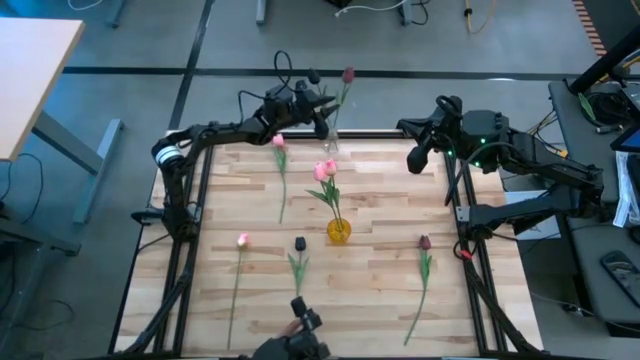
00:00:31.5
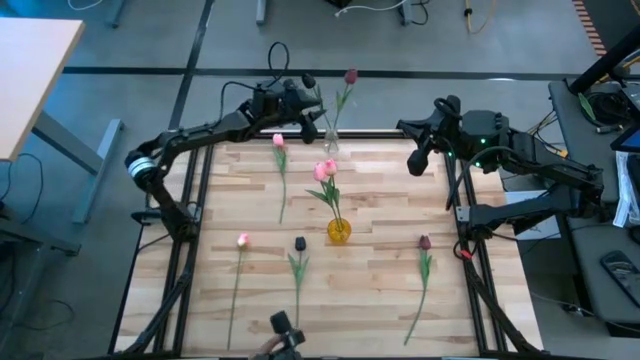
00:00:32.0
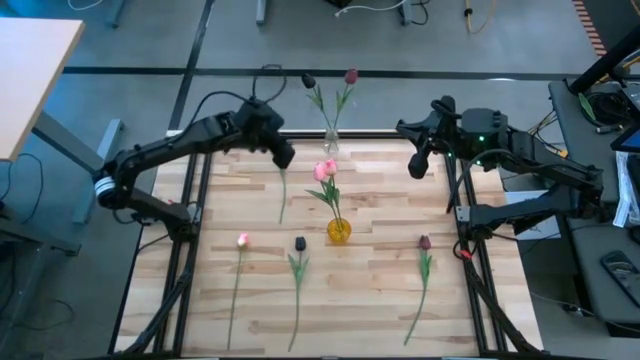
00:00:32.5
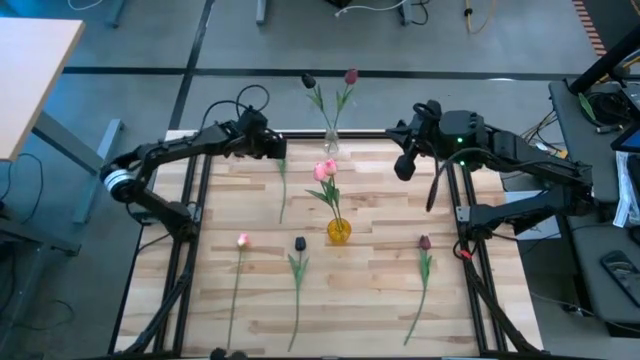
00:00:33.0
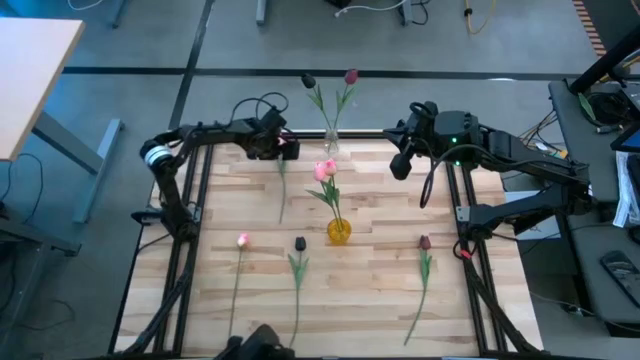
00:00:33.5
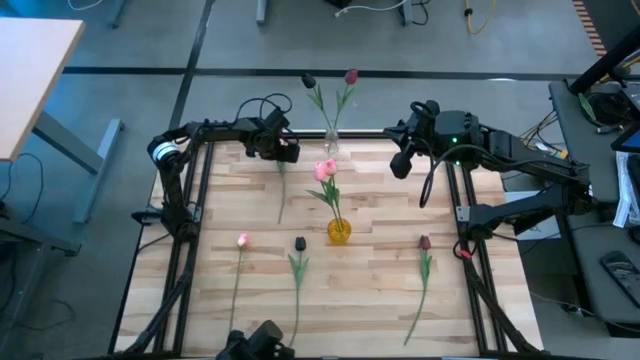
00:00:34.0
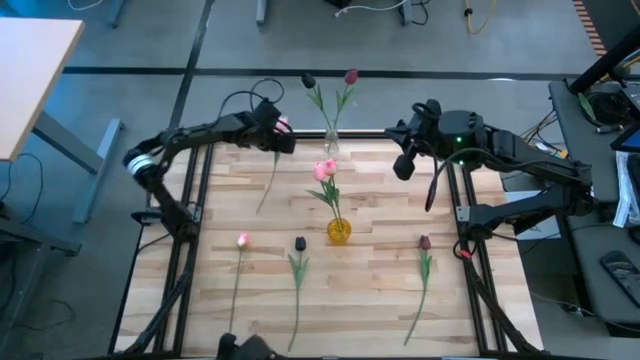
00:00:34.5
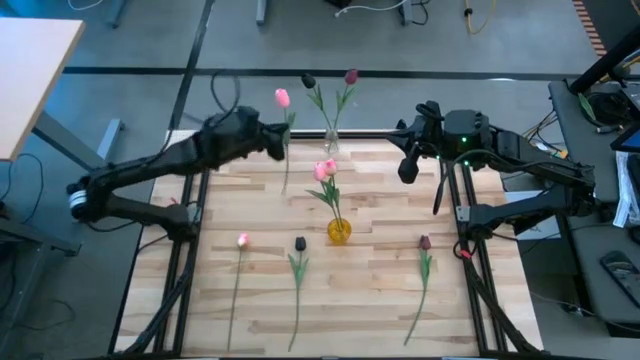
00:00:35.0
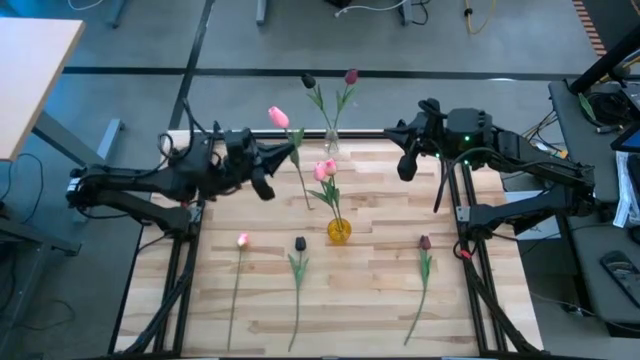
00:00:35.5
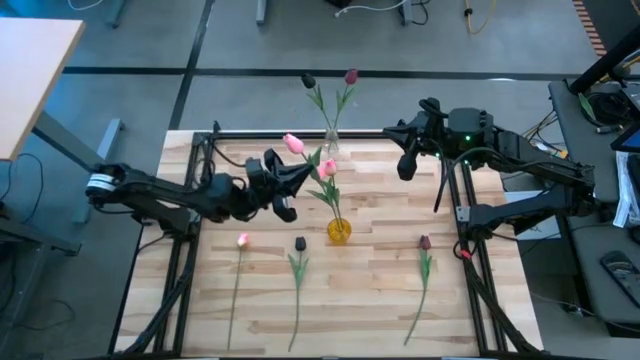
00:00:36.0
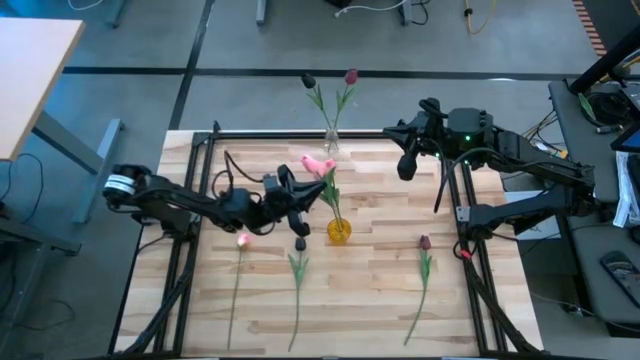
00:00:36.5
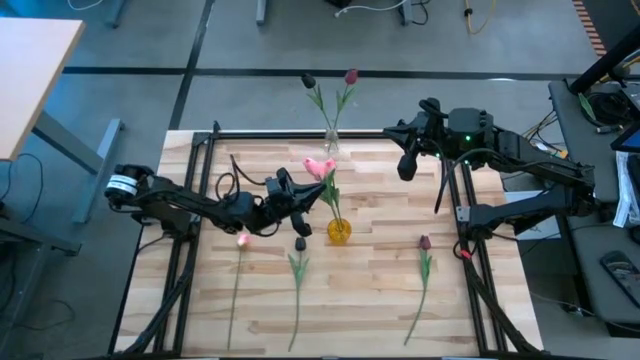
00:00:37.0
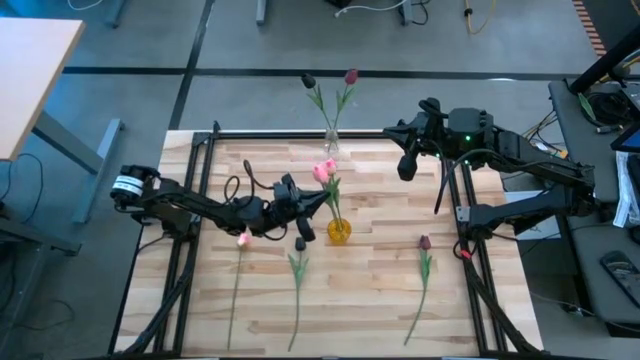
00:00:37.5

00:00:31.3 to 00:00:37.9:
Task: Sort flowers into vase by color
Put the pink tulip into the yellow vase

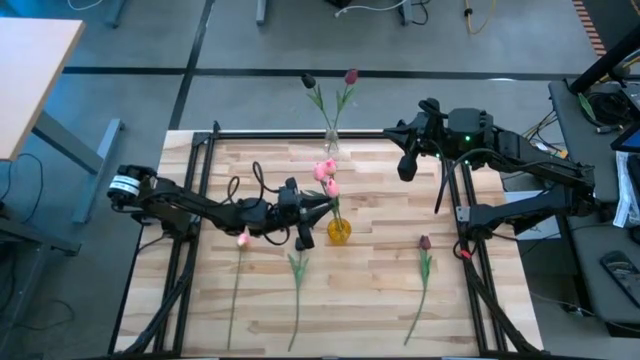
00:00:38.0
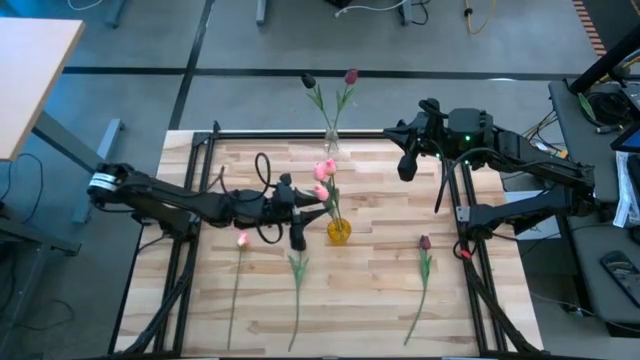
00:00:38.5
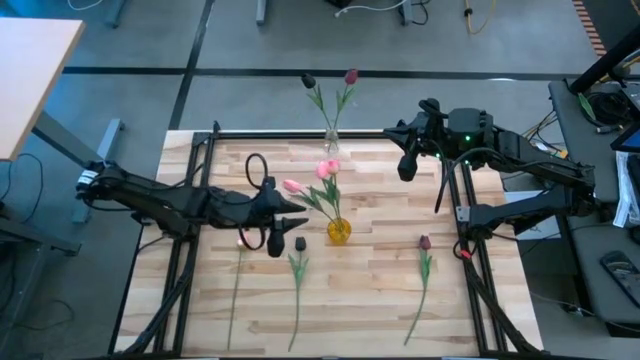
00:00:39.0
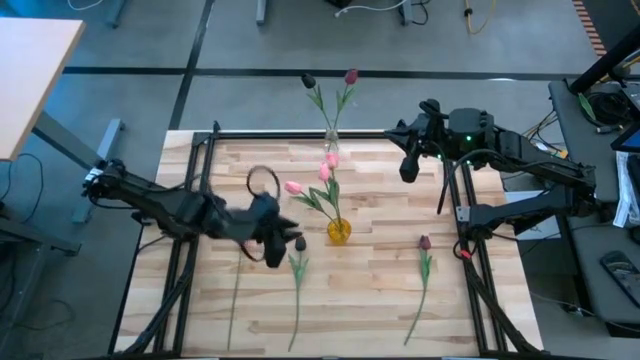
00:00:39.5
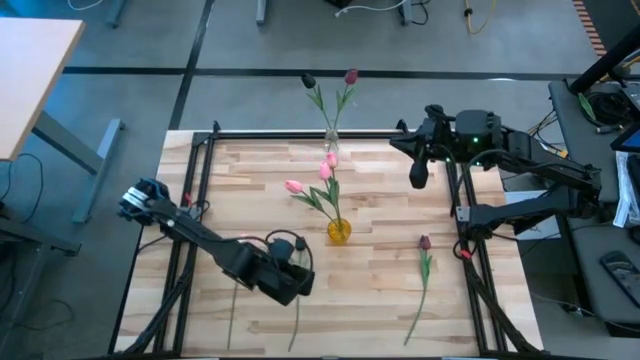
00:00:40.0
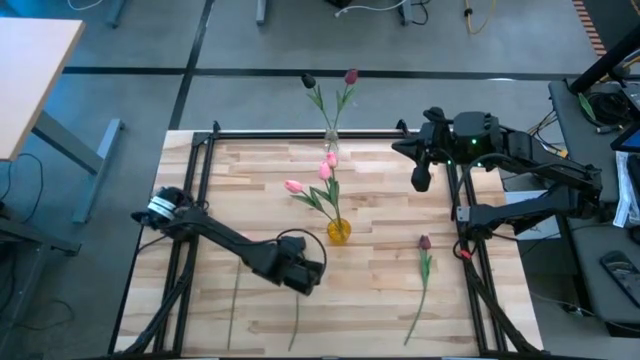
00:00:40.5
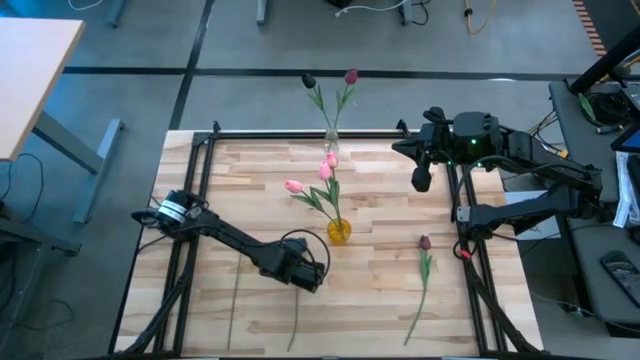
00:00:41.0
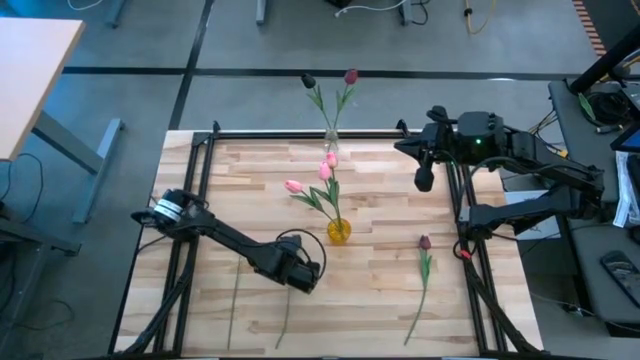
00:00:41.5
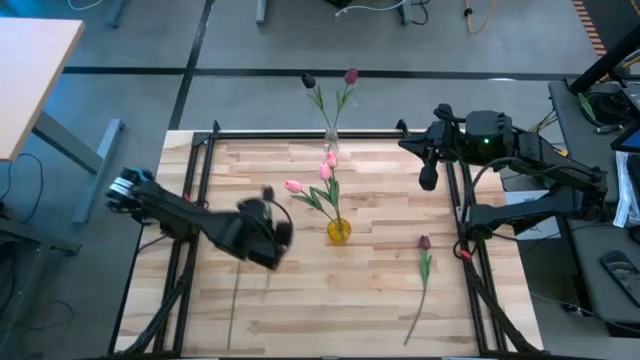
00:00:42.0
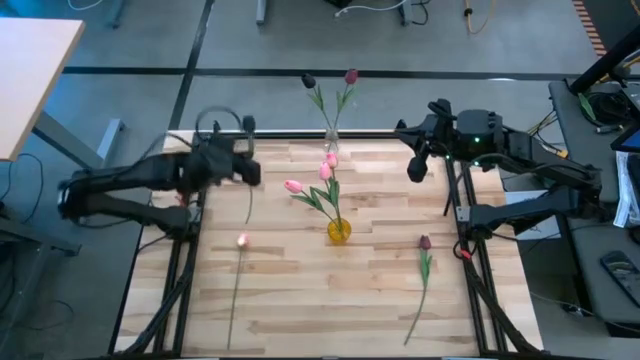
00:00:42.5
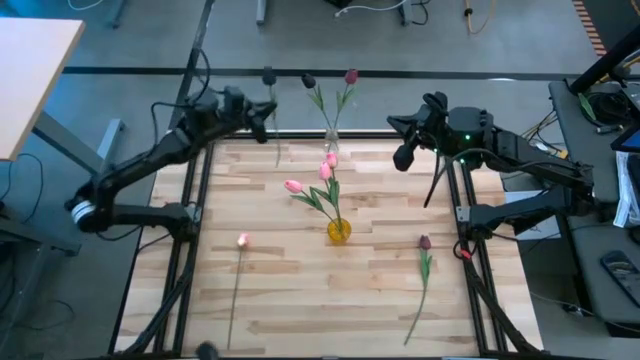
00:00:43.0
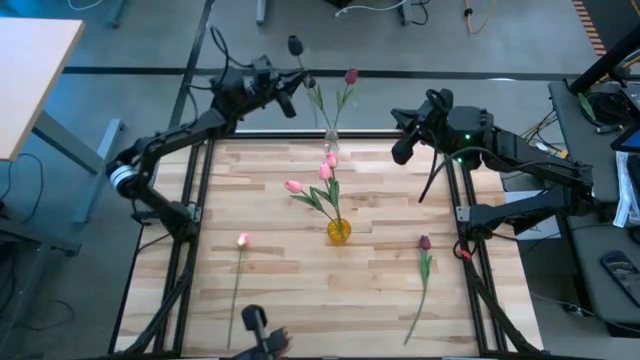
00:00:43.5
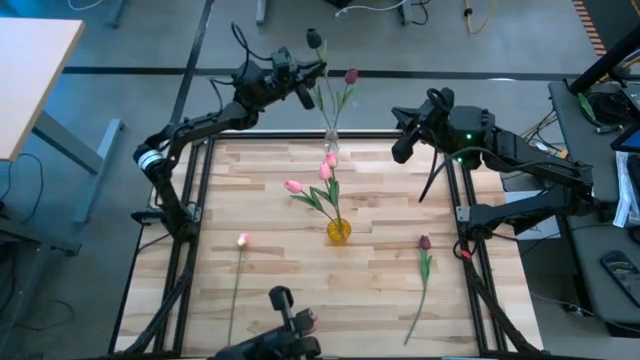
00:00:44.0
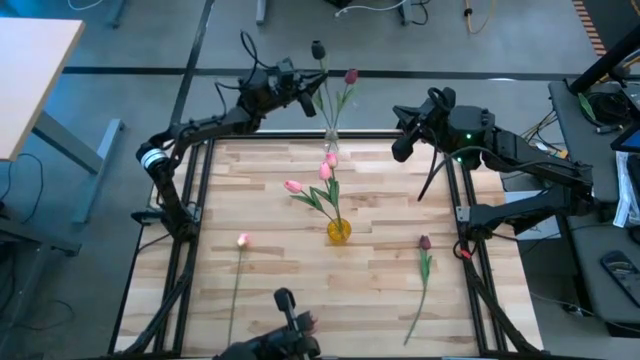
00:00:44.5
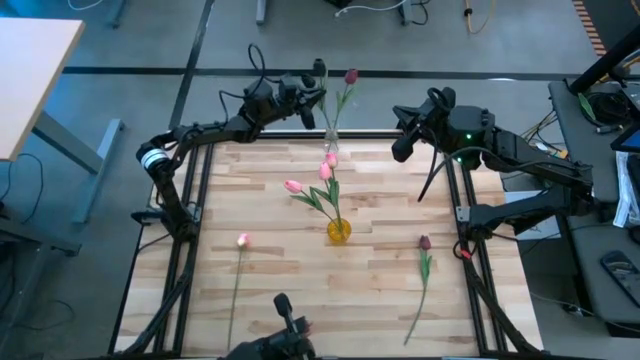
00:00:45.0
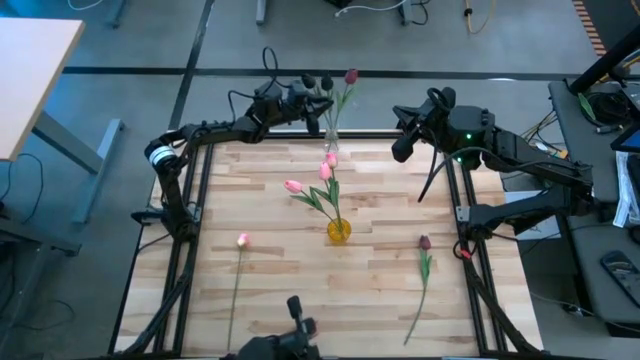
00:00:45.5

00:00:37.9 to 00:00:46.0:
Put the black tulip into the transparent vase

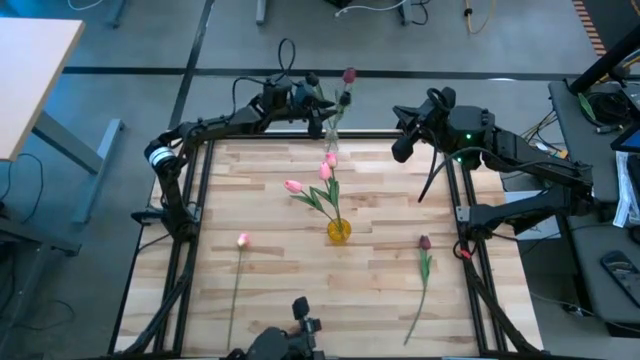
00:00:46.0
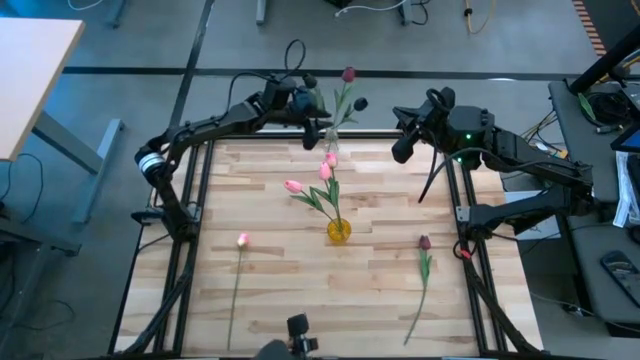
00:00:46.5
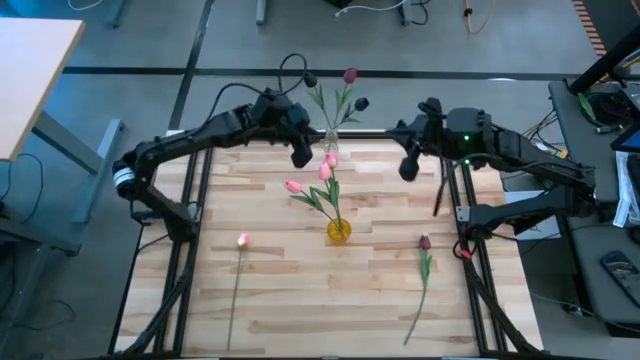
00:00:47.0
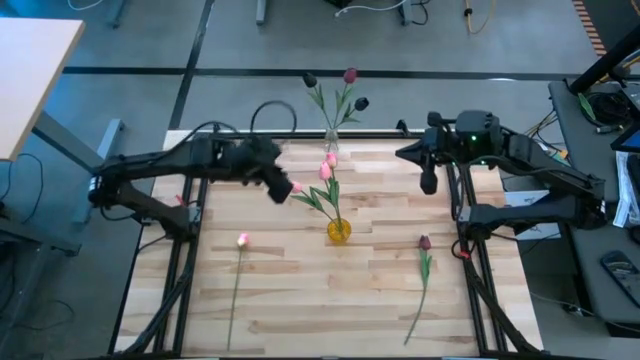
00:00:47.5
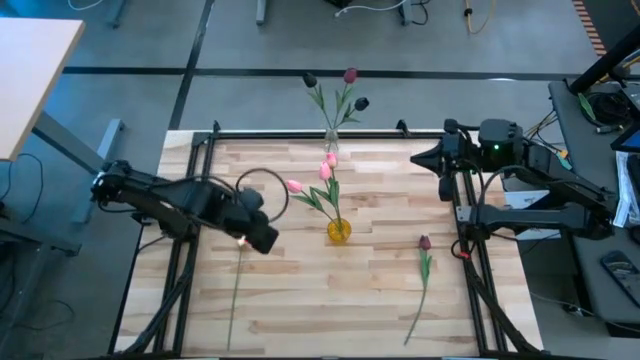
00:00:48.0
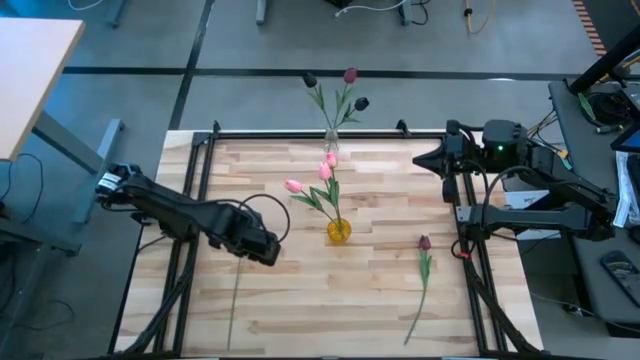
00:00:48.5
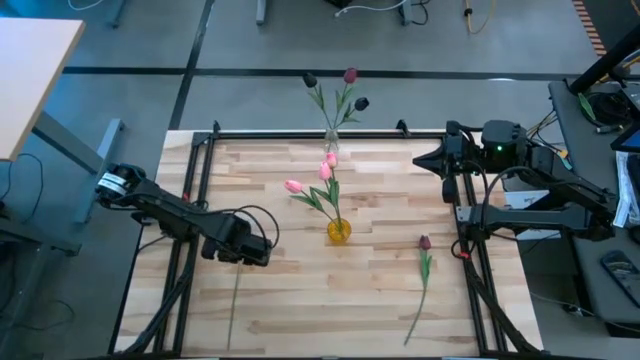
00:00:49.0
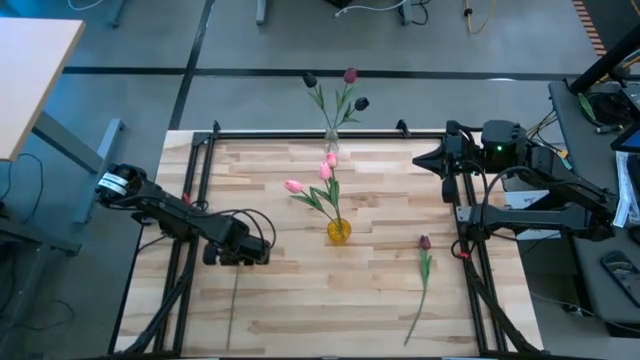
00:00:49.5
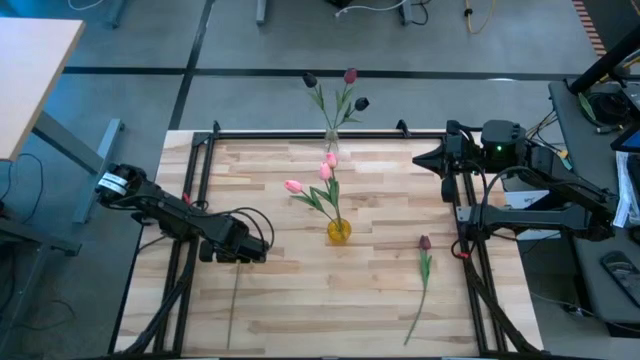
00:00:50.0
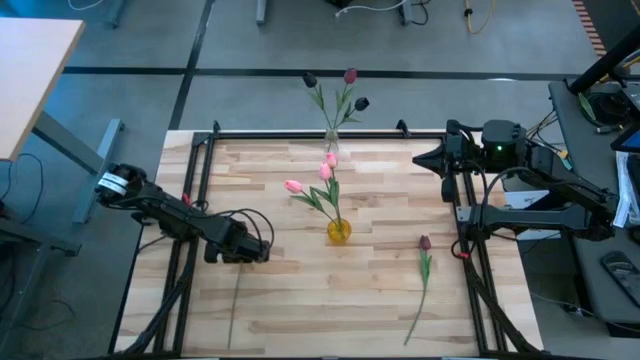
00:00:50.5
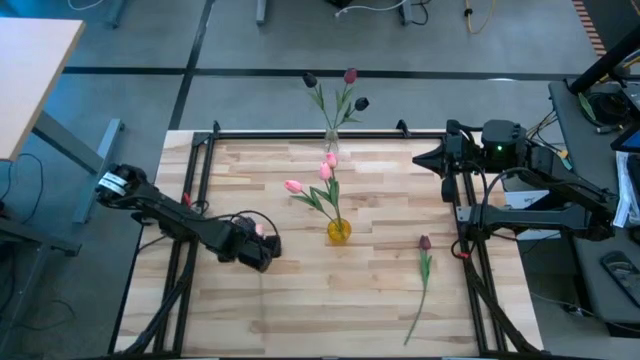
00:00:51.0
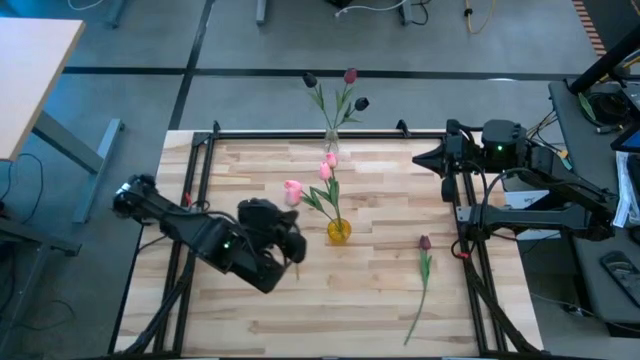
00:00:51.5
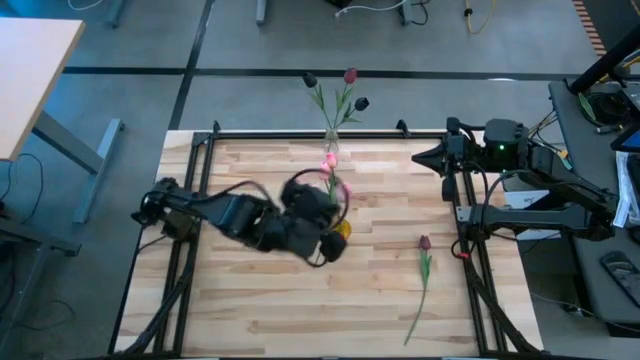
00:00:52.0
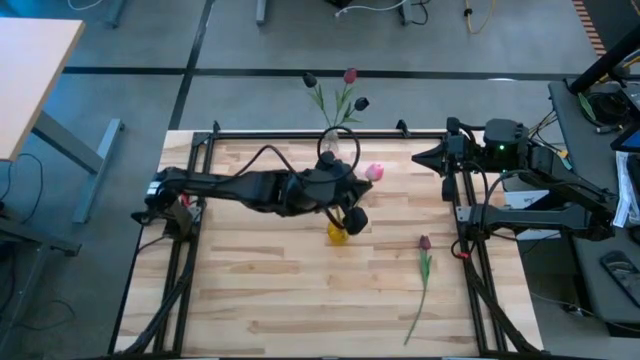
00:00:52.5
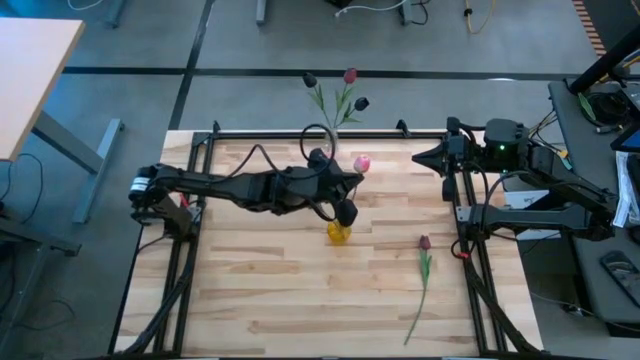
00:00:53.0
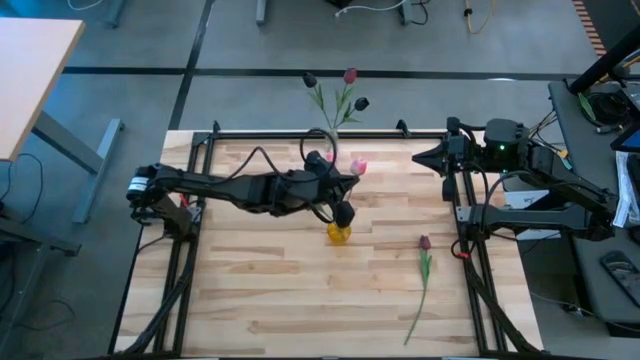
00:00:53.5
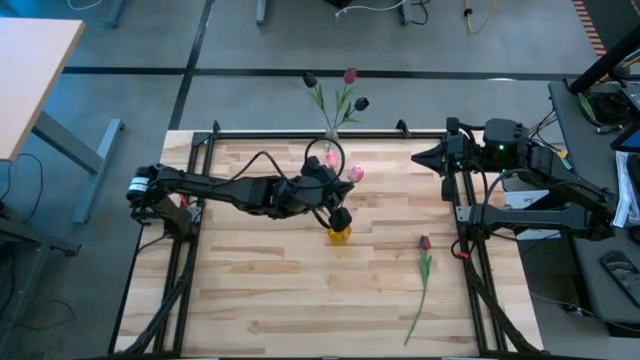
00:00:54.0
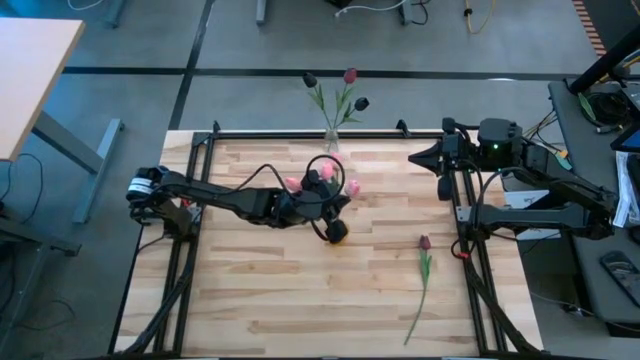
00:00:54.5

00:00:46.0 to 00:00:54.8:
Put the pink tulip into the yellow vase
